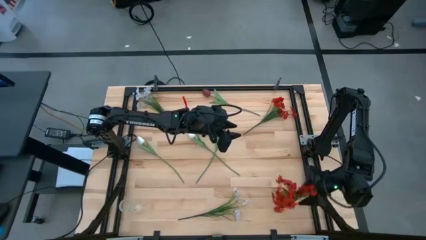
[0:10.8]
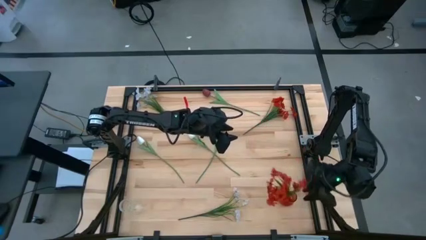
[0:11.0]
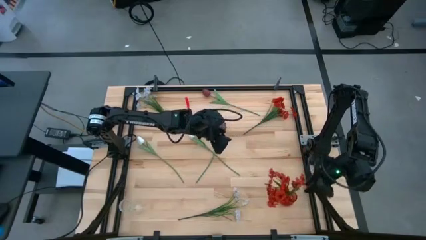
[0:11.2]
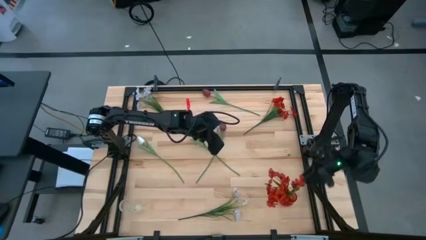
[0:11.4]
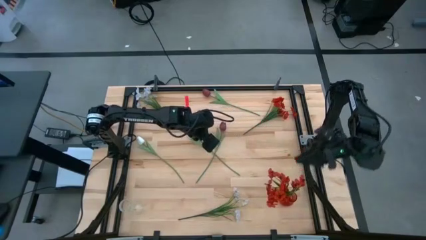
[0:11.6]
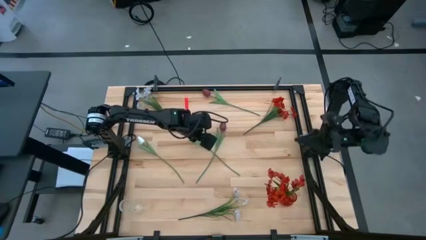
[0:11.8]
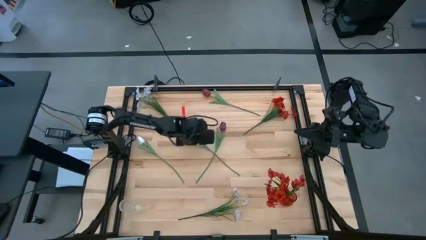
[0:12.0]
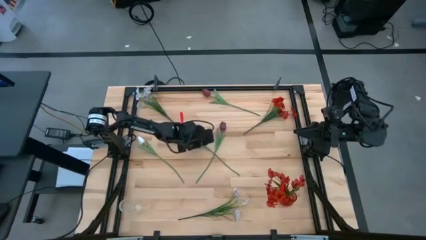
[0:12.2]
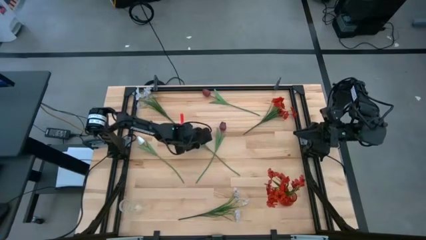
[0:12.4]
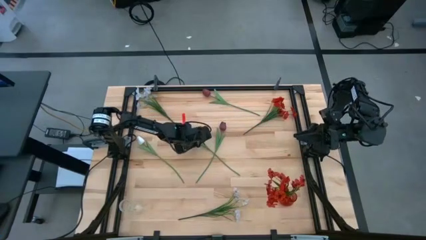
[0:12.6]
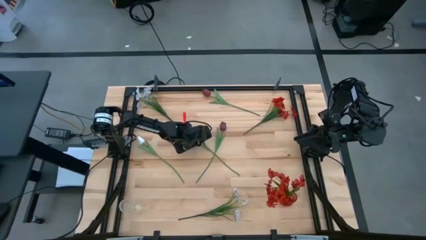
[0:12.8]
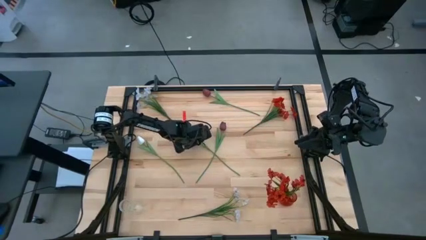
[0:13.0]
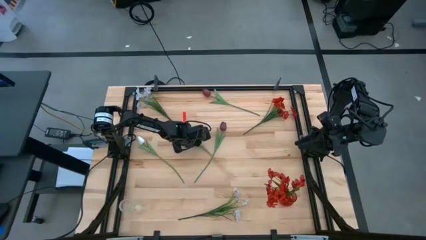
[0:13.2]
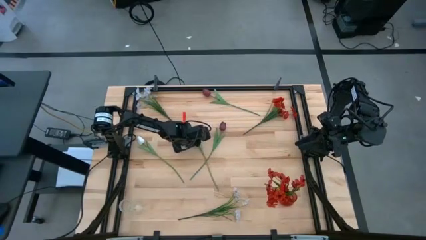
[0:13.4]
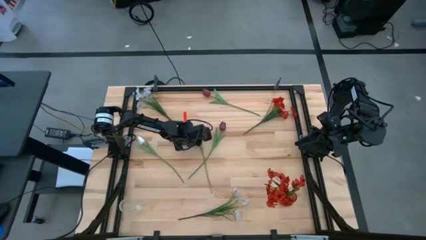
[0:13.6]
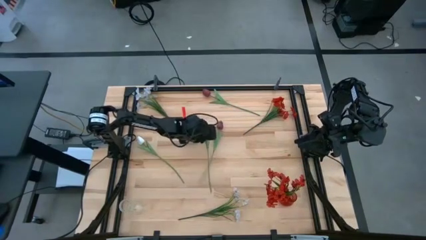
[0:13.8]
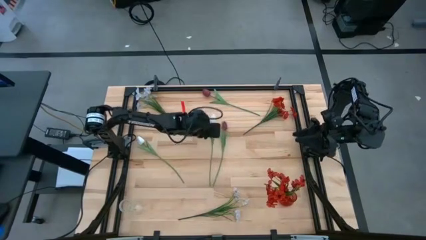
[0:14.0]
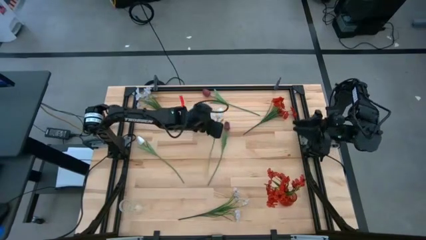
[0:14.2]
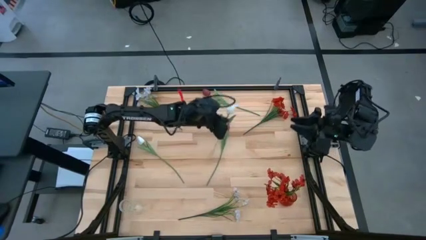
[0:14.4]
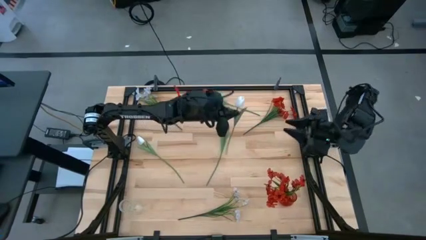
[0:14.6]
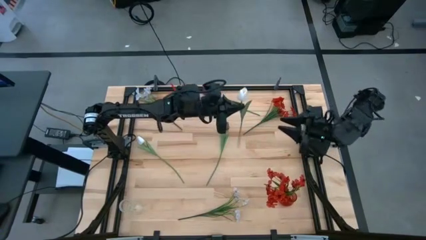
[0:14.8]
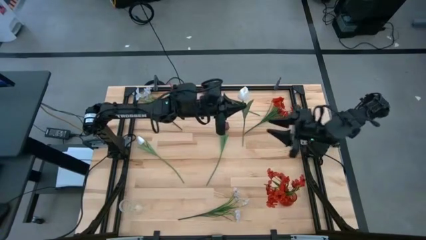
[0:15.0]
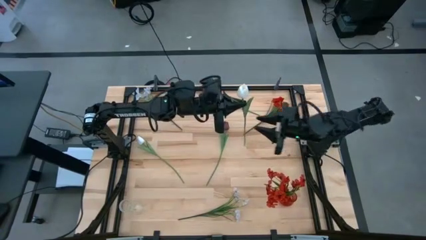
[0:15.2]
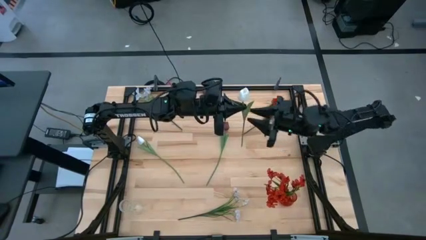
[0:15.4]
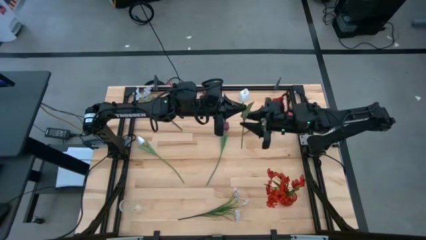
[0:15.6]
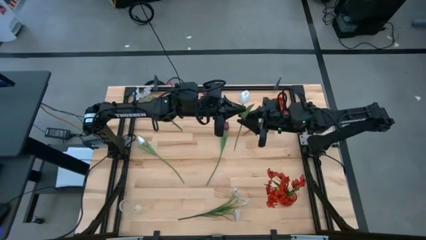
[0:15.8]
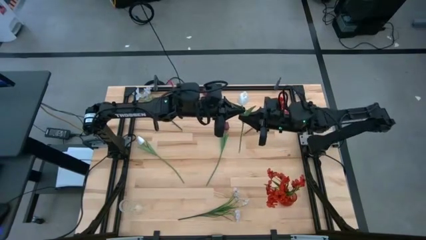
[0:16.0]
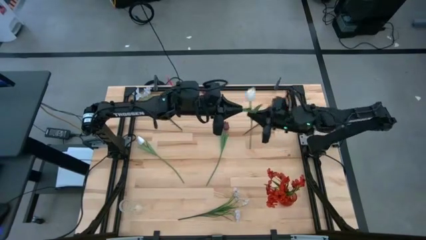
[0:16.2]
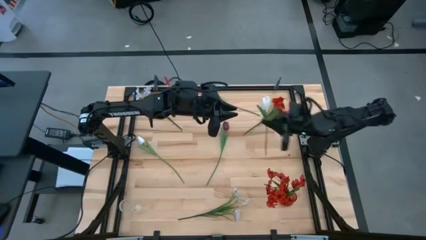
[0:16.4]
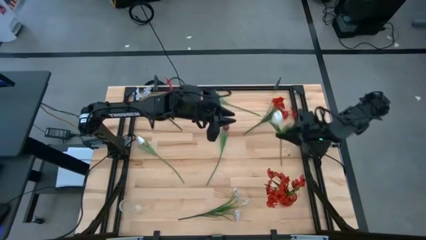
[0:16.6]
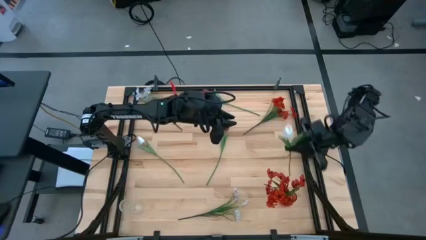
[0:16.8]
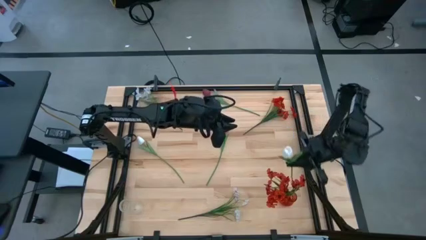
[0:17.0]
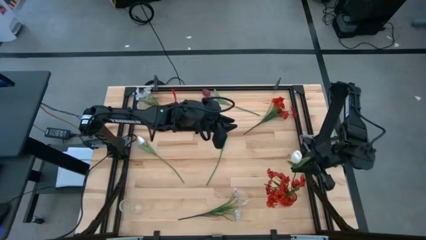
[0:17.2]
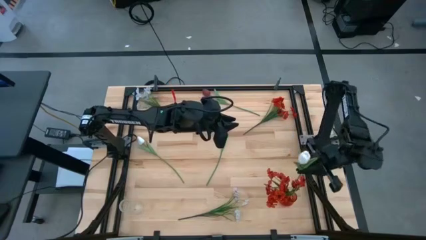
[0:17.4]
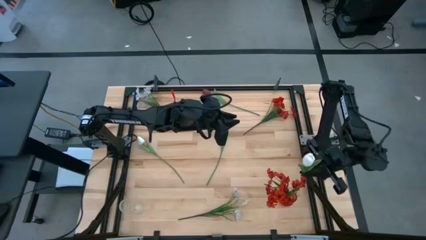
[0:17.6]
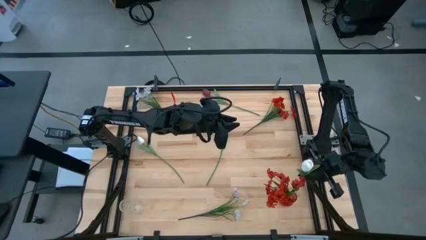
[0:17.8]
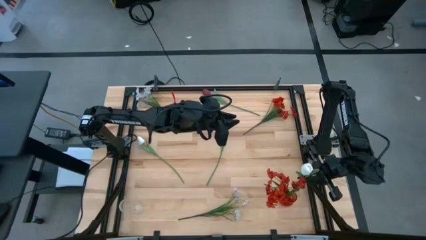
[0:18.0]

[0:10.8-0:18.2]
Task: Sort flowers into vase by color
Put the right white flower into the red vase

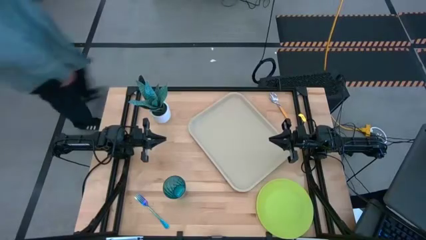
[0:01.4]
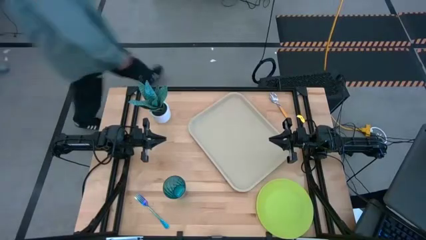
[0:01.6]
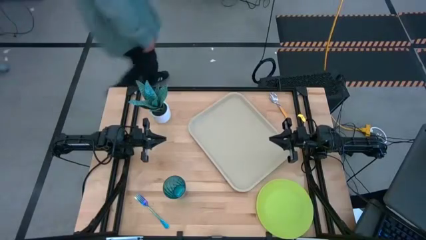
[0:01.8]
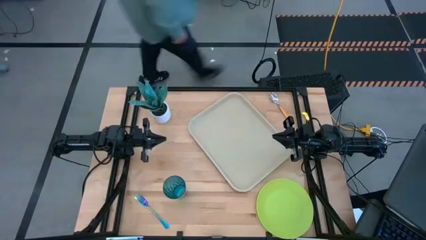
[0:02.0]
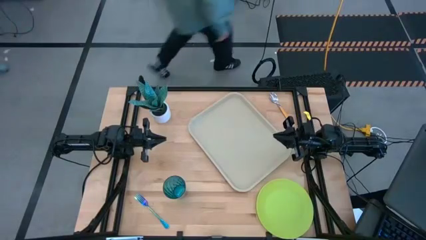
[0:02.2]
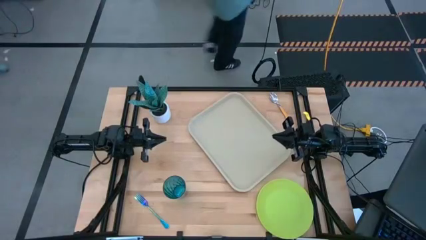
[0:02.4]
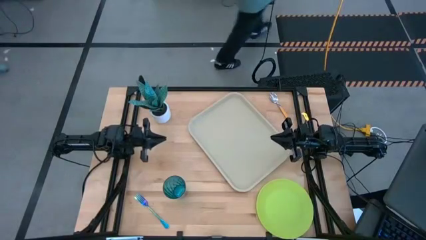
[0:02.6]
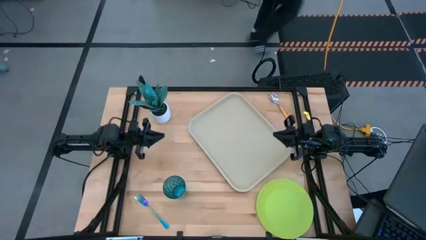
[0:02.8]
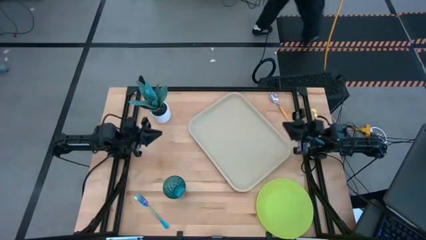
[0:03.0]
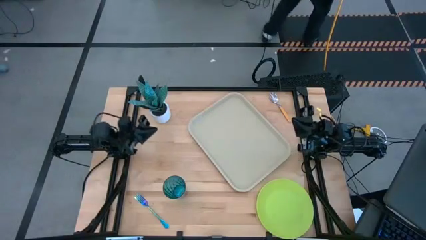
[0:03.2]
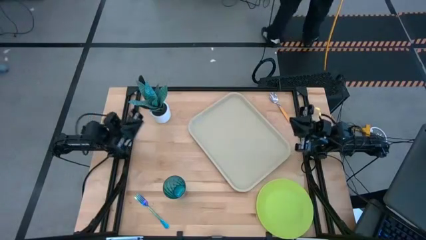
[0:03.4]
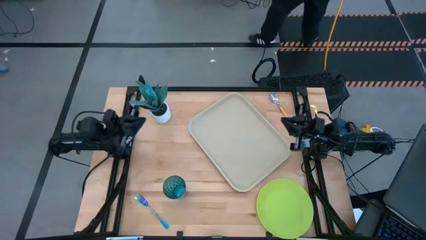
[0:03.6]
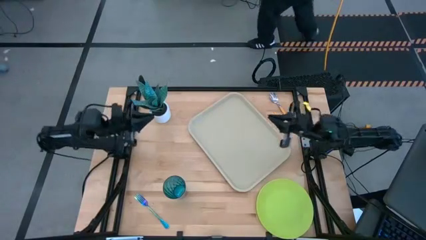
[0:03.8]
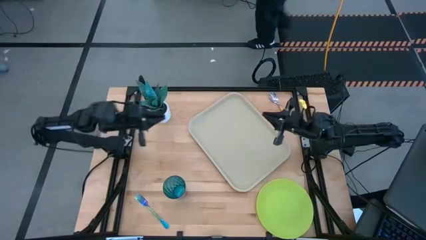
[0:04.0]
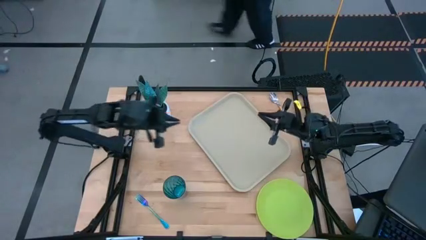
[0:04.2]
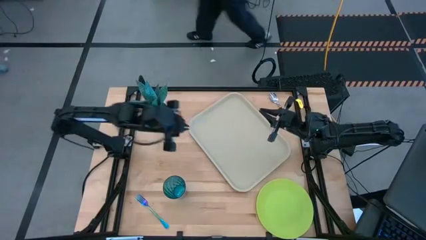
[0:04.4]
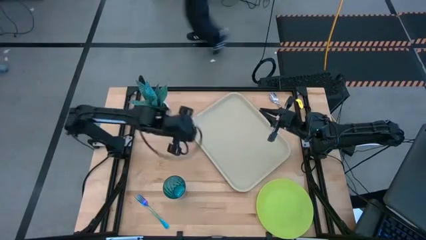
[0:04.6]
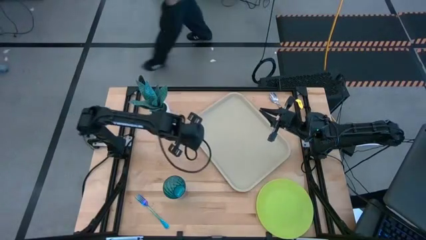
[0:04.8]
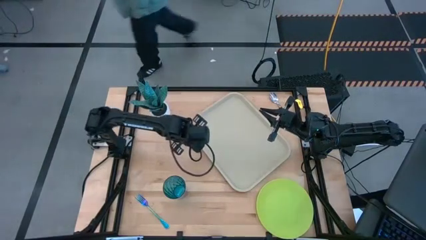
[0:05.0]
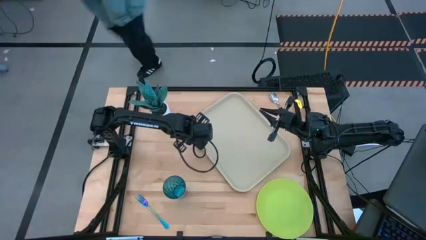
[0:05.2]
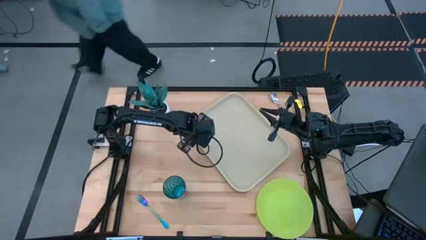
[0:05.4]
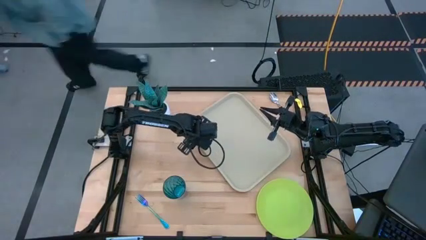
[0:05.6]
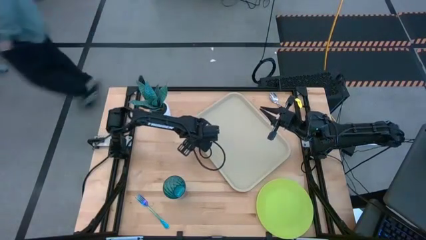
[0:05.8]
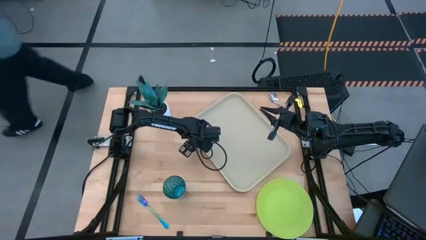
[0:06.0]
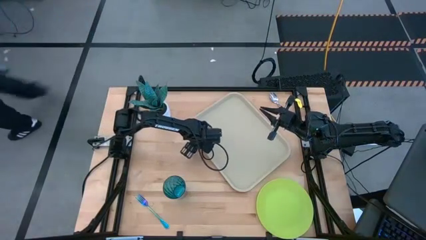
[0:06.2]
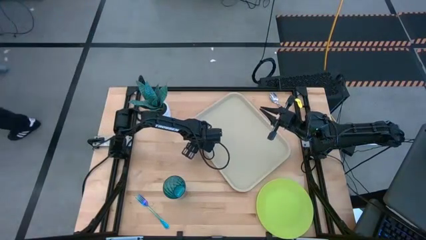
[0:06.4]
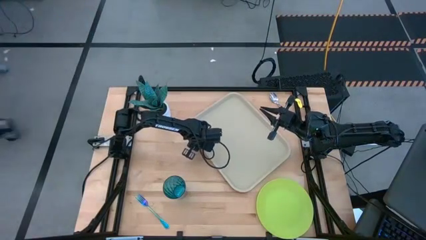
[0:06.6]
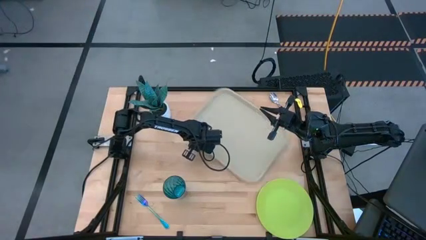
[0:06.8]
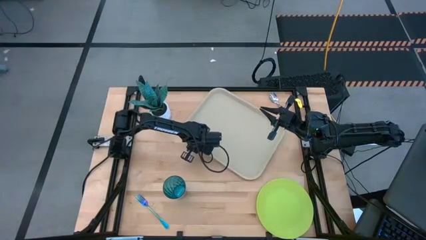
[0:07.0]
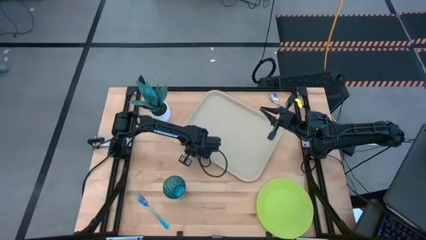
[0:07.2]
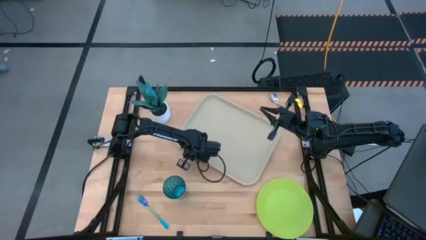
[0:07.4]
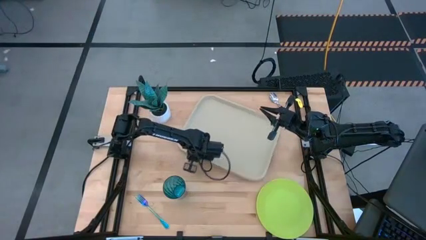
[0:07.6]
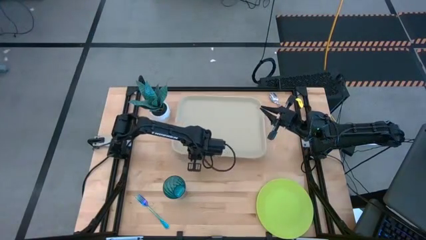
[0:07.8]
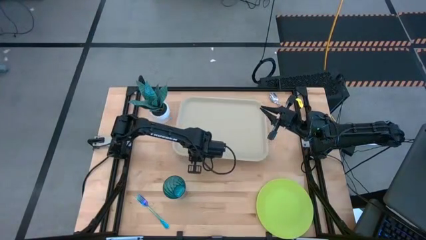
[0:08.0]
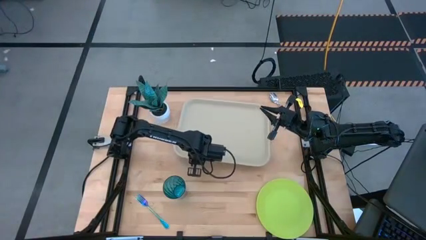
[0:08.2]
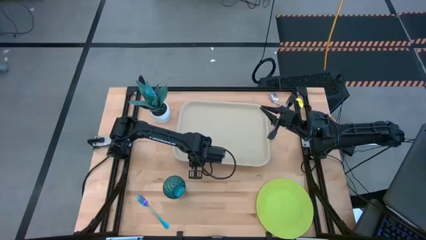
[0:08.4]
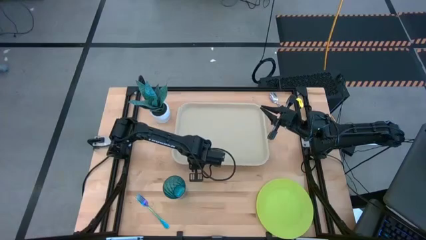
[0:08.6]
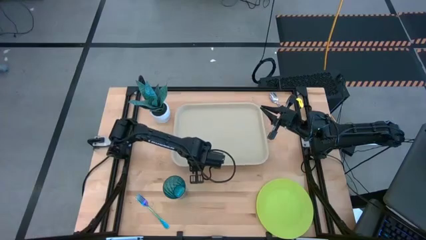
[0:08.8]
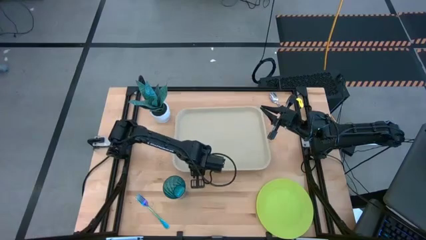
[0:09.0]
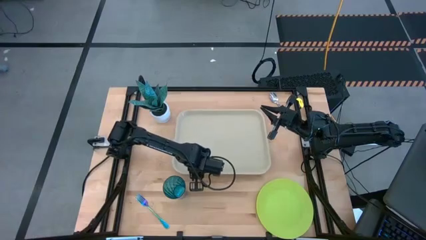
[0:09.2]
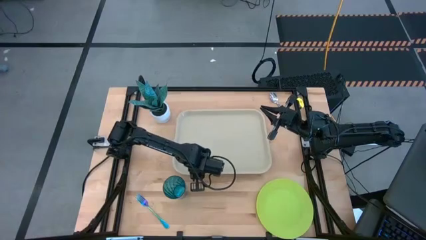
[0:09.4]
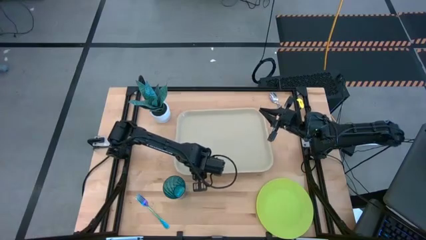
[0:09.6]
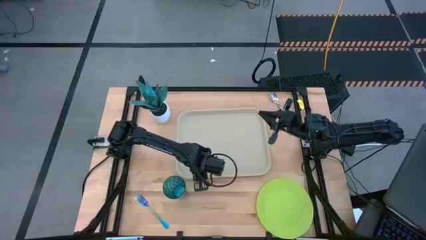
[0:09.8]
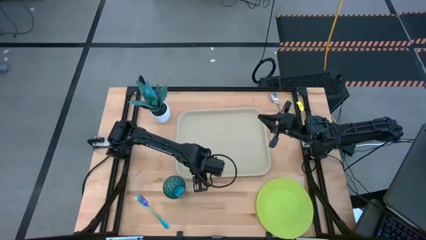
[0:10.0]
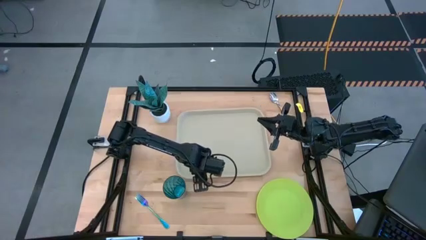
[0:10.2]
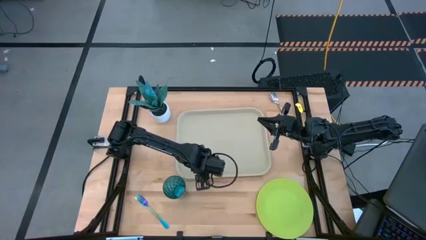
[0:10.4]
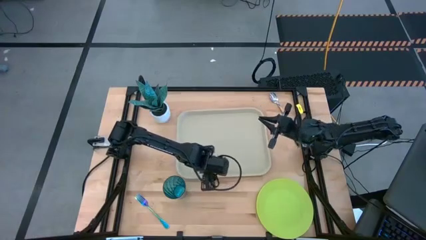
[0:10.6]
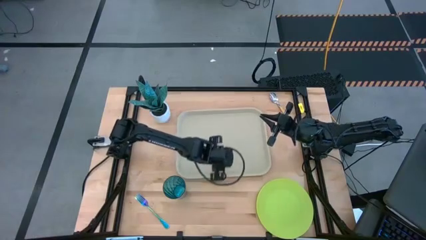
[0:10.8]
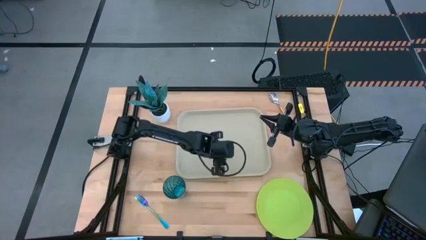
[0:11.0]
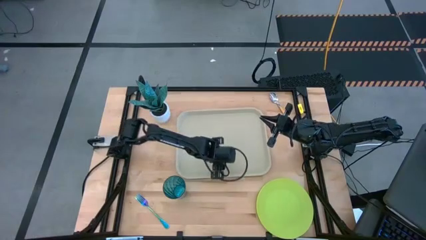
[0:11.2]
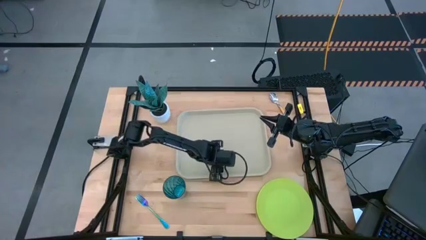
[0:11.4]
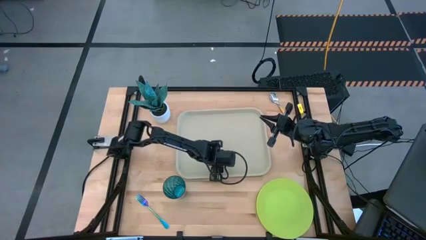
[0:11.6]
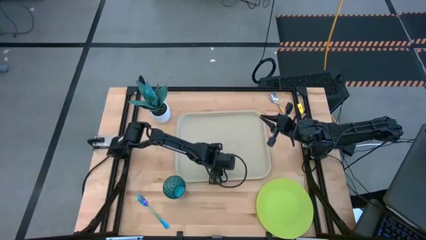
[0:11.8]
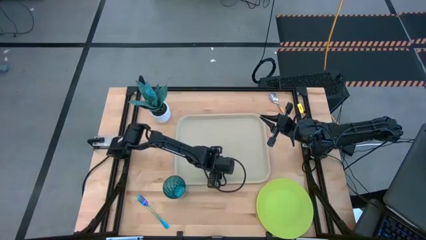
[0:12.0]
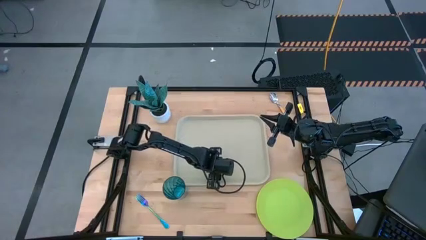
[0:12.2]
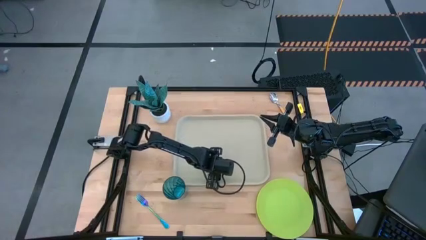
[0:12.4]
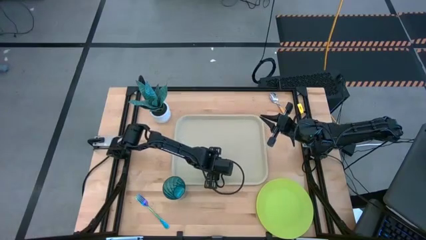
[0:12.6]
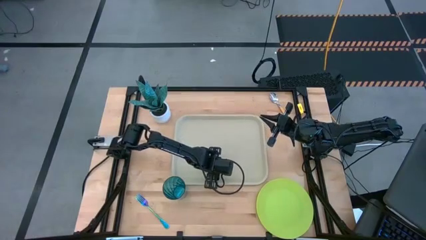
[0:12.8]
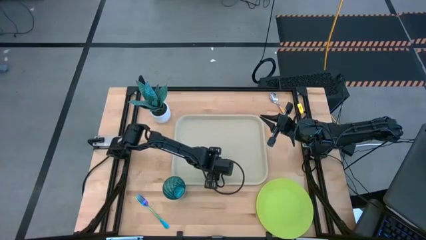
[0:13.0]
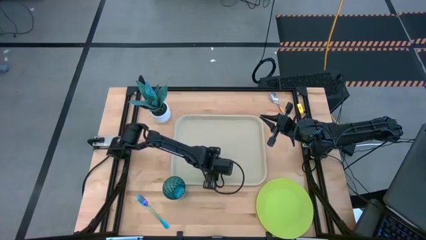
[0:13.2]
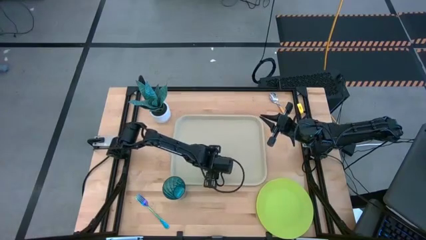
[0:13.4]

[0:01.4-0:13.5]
Task: Pick and place plate/cup/fork/spoon on tray
Adjust the white food tray to the center of the table
